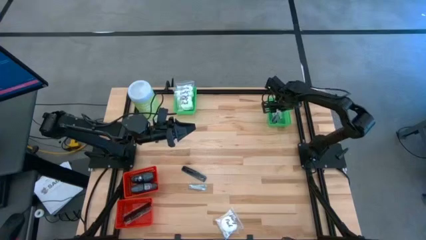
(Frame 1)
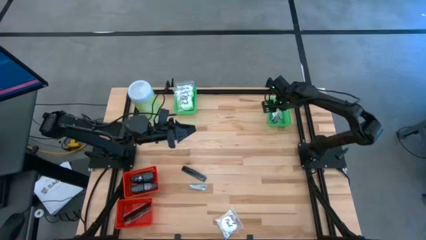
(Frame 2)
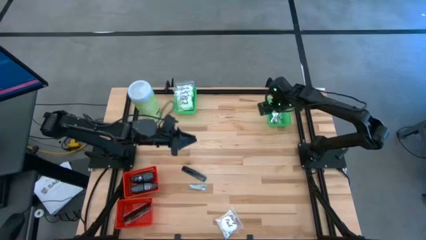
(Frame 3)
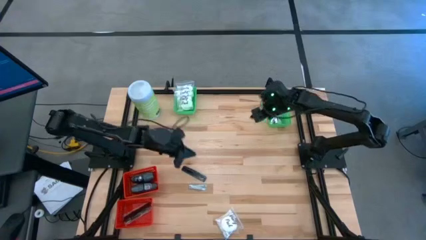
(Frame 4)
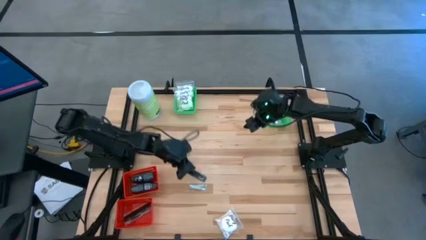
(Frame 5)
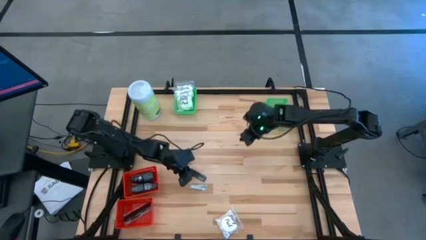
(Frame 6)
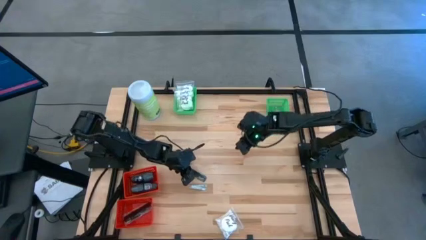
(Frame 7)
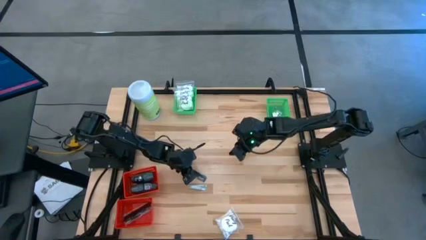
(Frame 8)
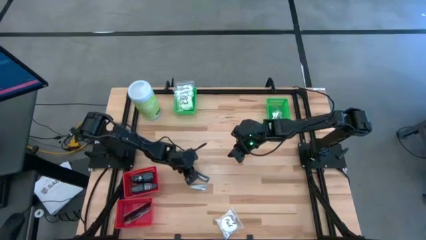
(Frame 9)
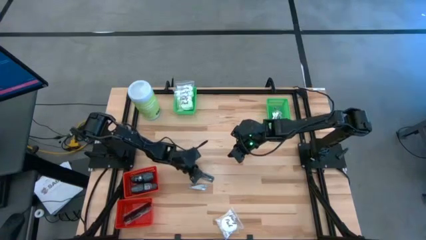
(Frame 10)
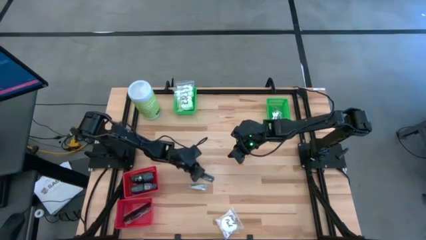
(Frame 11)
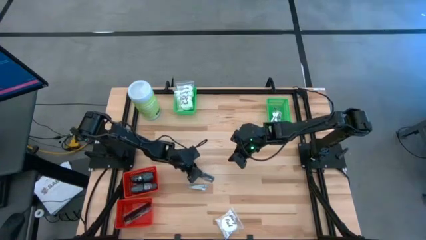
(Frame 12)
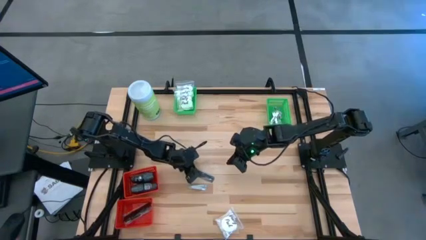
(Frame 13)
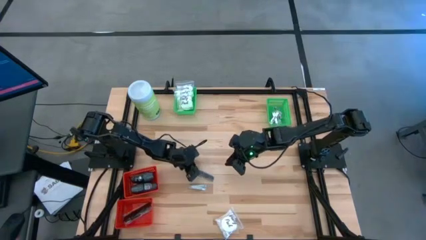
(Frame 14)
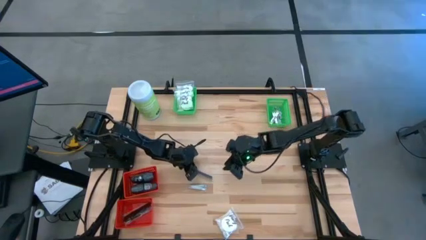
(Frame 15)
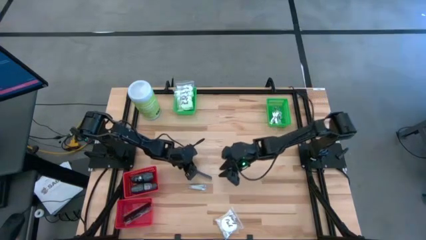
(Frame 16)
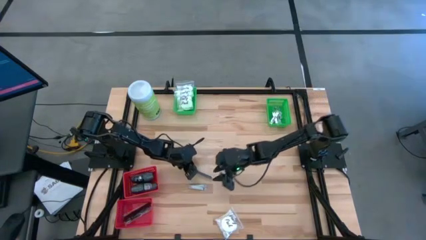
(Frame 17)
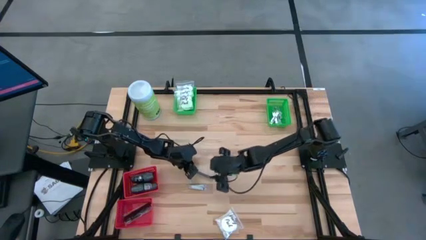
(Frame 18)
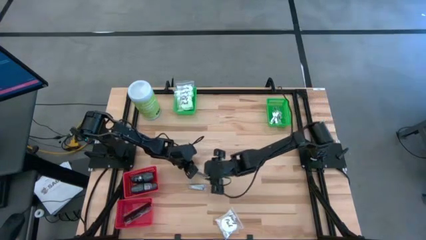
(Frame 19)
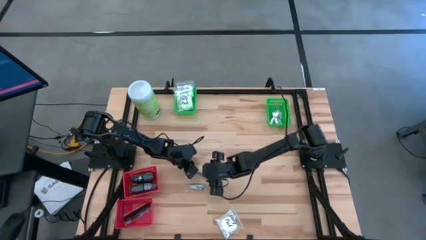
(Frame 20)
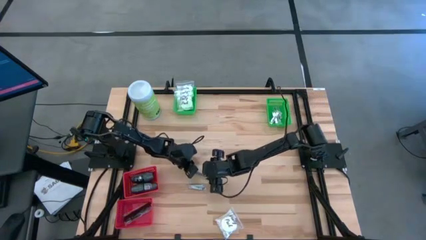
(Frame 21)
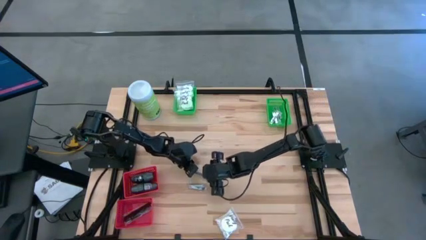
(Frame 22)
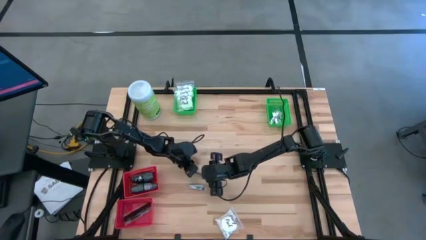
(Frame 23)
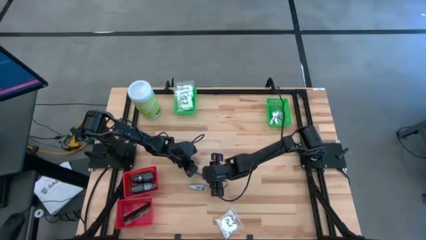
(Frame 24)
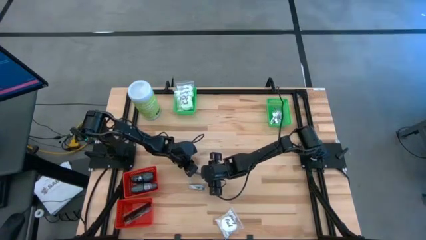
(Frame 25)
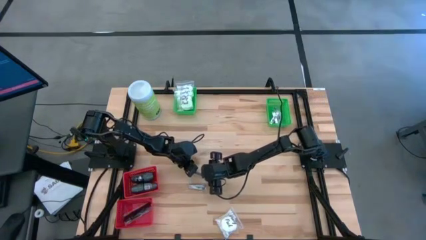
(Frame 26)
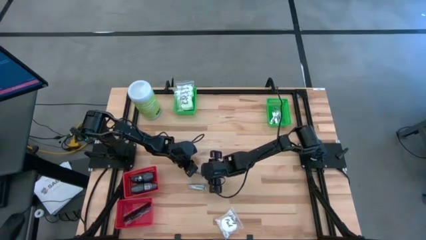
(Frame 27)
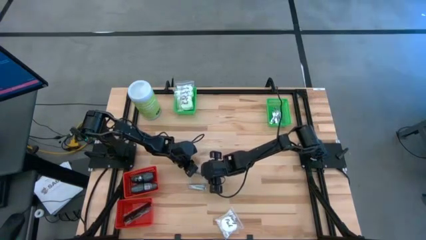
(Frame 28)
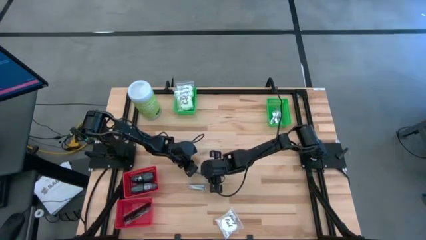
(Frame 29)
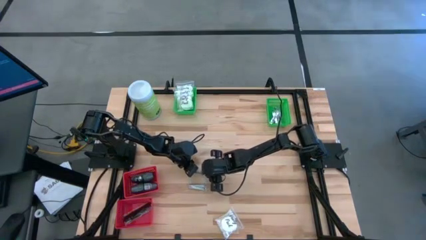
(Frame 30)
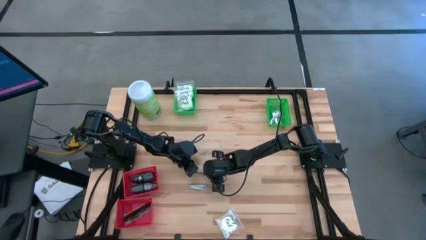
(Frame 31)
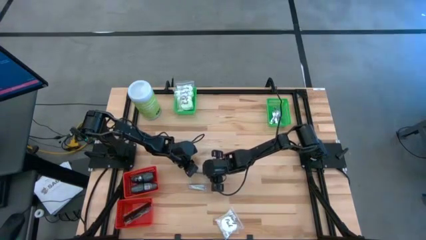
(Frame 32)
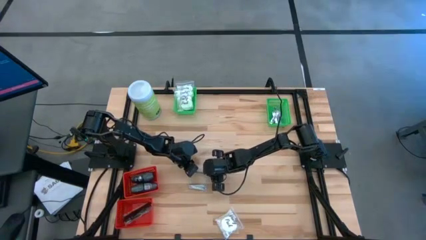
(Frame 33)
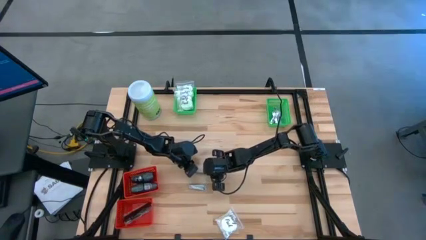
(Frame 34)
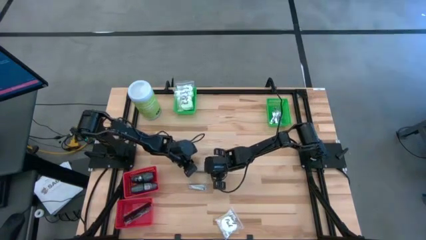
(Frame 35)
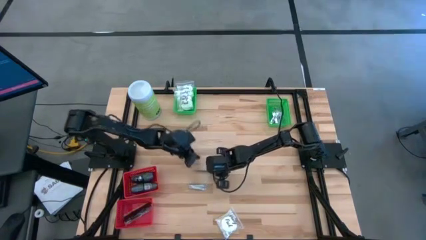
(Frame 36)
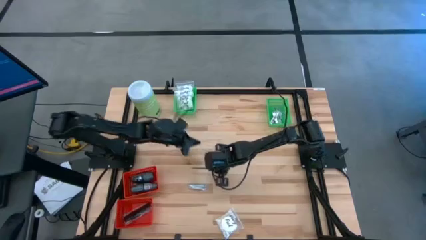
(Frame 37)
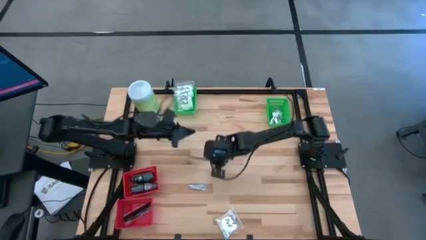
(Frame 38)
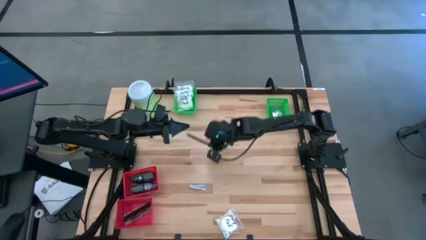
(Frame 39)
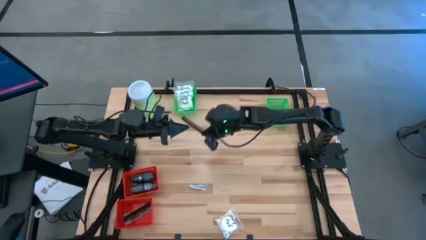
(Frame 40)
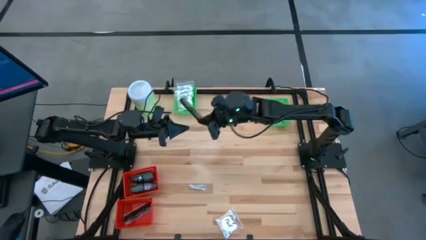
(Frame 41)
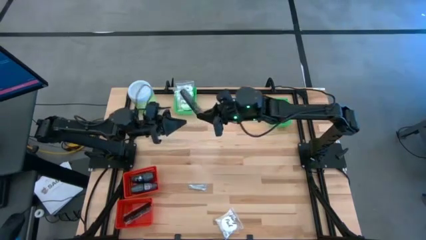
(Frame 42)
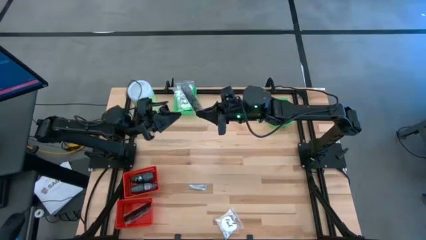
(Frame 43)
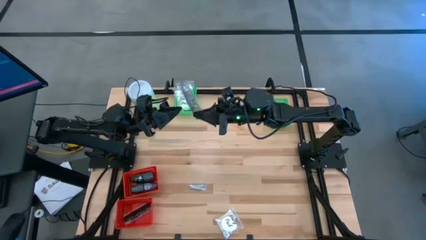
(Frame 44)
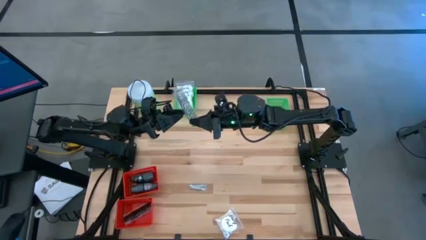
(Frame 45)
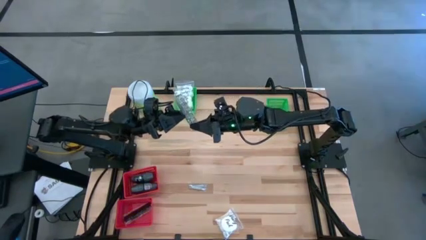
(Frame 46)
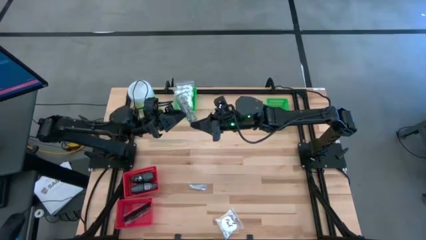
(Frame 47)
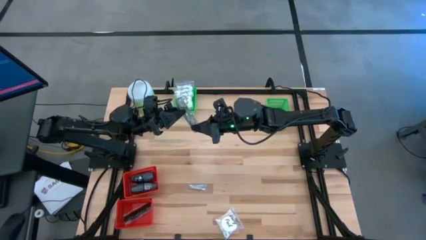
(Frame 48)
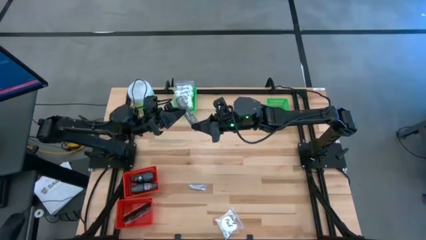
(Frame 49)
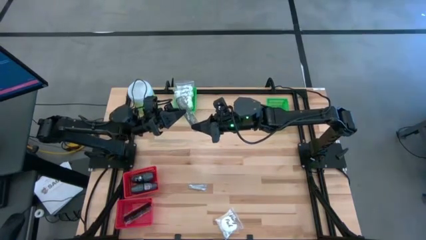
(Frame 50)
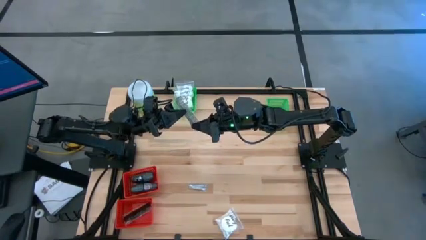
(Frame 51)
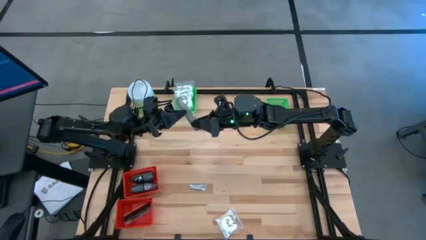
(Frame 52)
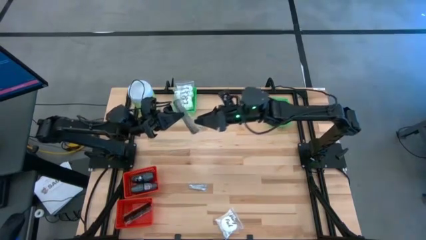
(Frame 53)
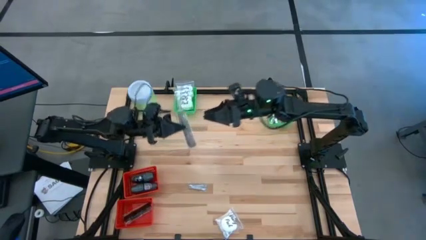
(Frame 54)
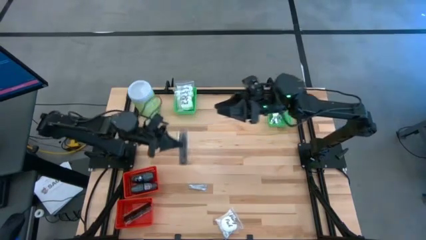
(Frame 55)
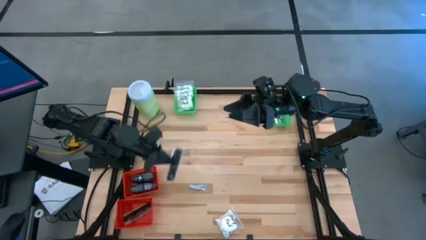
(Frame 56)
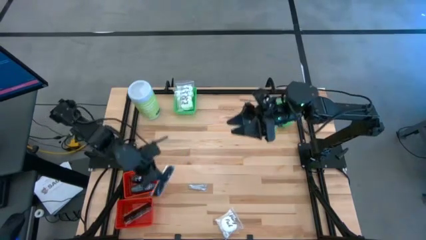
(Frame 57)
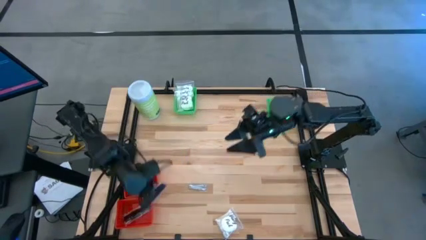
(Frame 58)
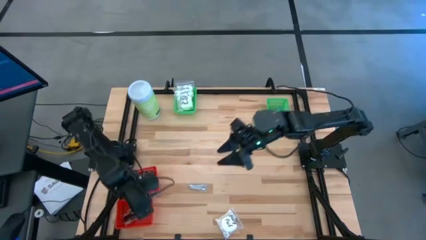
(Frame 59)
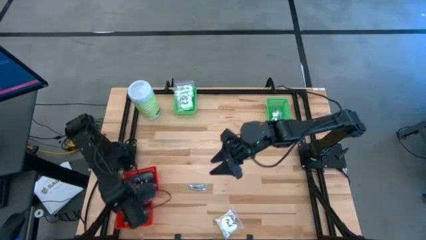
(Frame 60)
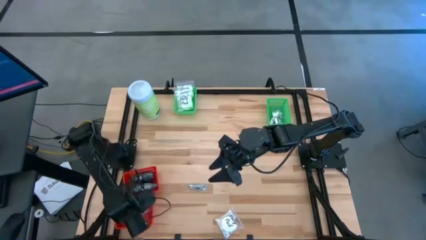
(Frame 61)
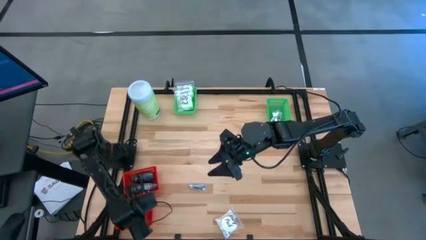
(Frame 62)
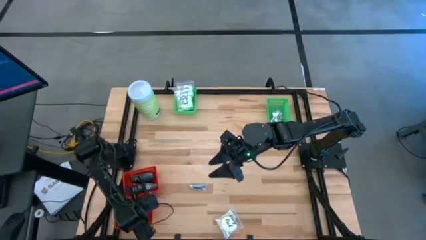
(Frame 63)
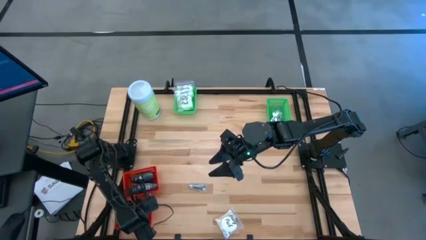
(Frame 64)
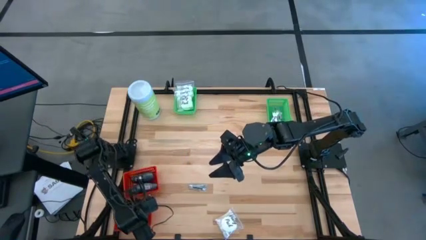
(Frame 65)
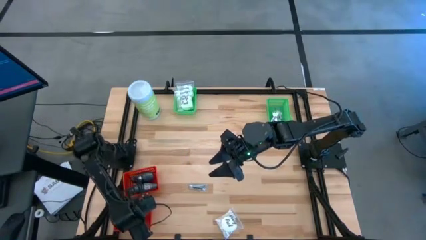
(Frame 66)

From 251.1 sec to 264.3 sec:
Task: Pick & Place Travel size toiletries
Put the black comb into the bottom red basket

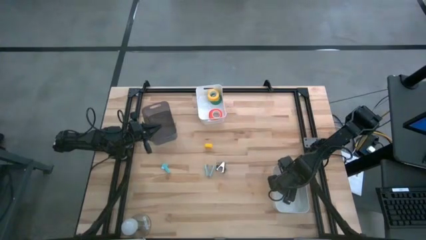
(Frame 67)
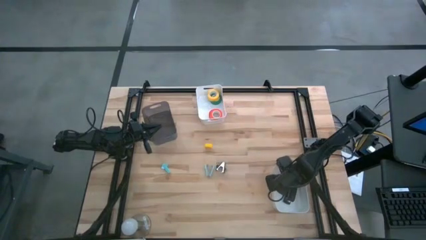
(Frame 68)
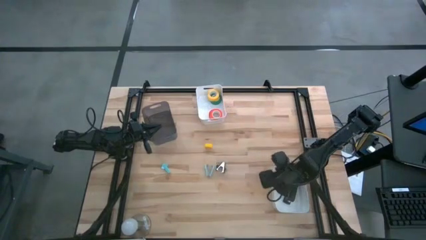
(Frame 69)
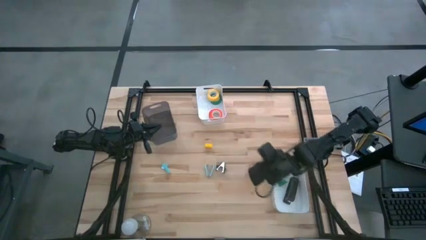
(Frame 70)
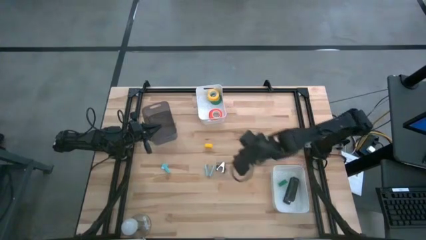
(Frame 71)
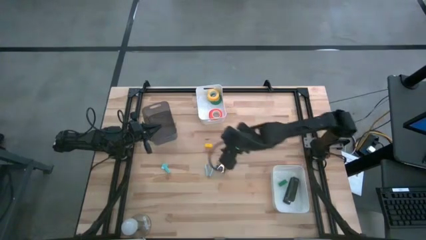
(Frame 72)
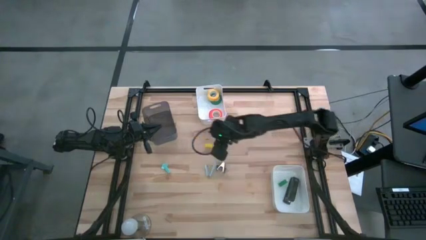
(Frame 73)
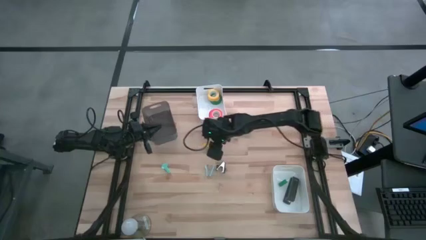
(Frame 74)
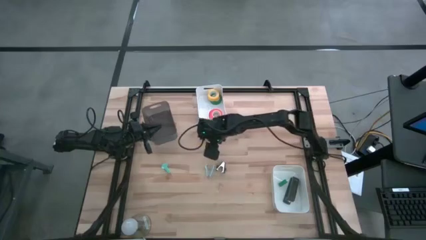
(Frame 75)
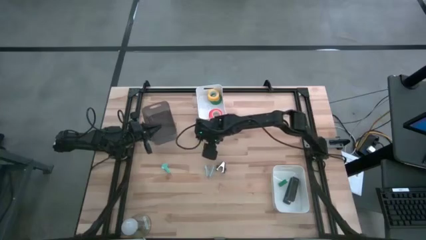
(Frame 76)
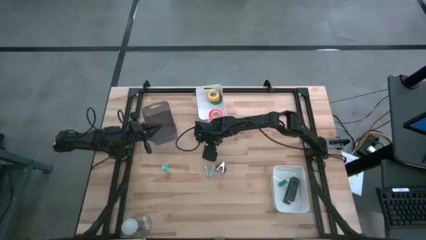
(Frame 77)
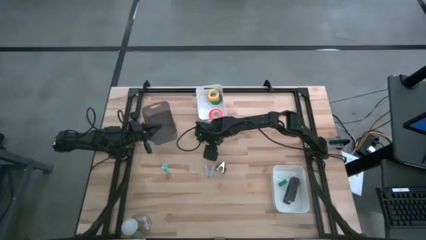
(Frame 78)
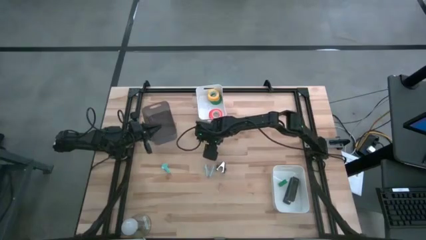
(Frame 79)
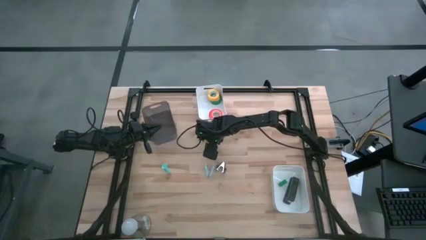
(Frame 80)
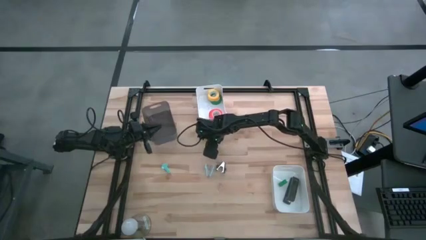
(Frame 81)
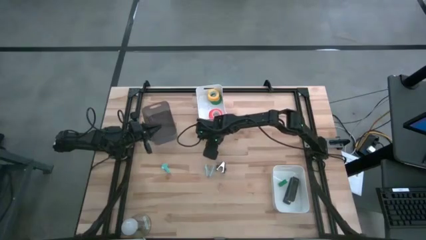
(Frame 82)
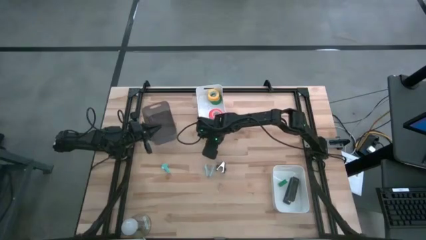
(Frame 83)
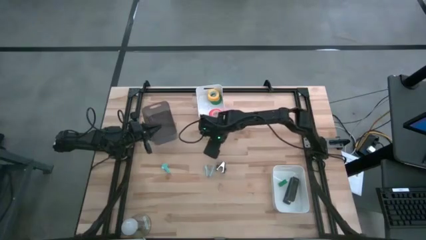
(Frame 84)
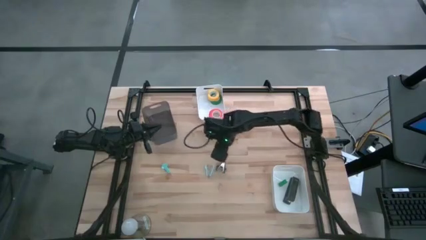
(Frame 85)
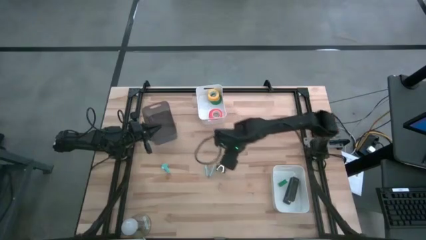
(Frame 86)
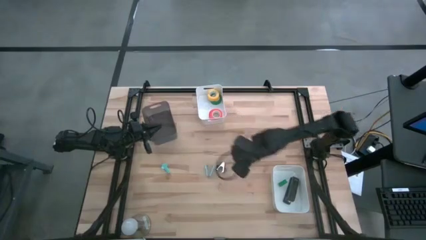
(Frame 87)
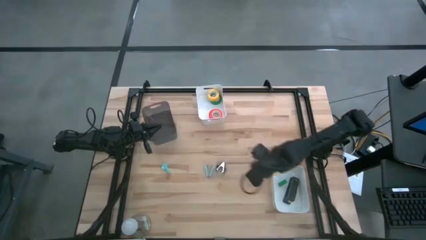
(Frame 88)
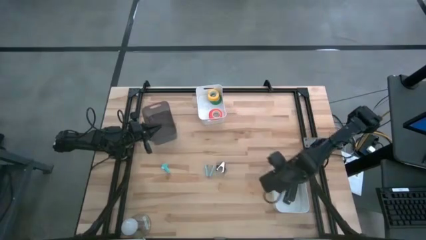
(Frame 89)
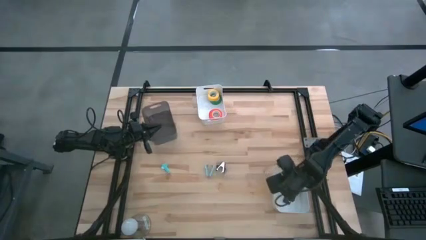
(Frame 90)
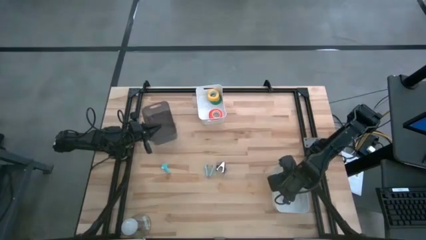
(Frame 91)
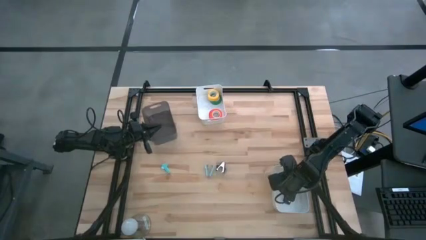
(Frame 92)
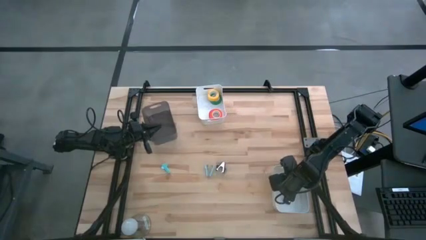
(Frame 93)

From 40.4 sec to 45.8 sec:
Task: Pick and place Stapler, Stapler remover, tape
Put the yellow stapler into the bottom white bin
